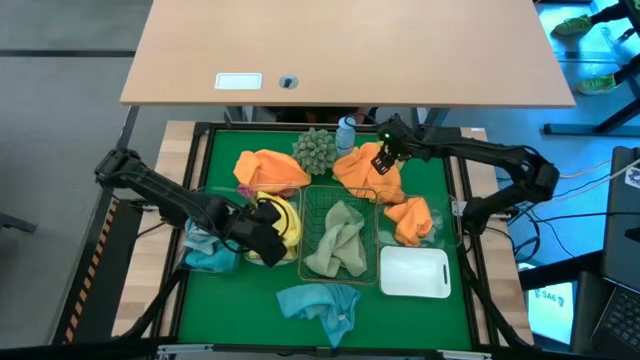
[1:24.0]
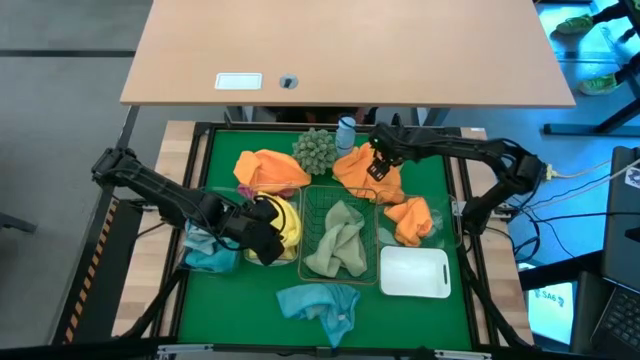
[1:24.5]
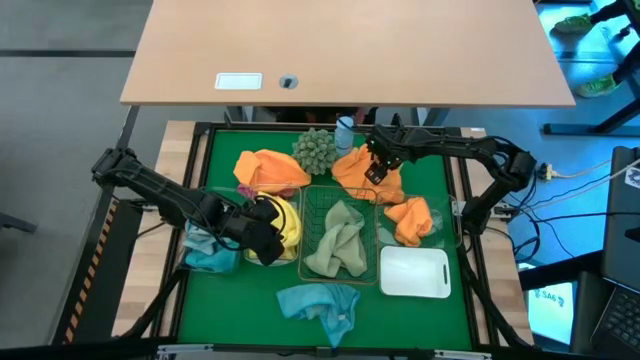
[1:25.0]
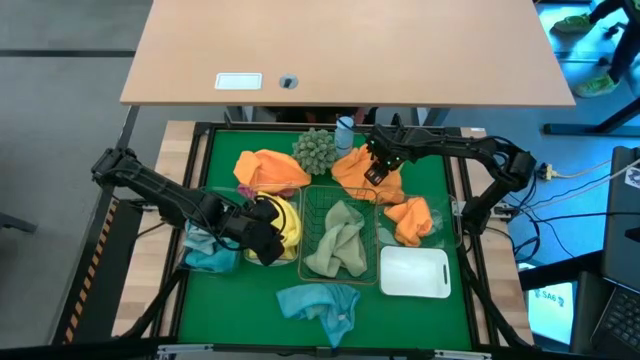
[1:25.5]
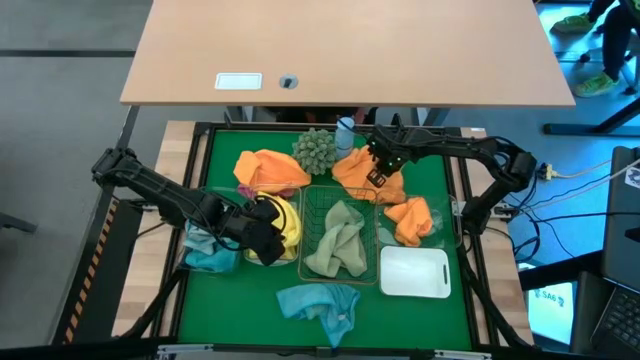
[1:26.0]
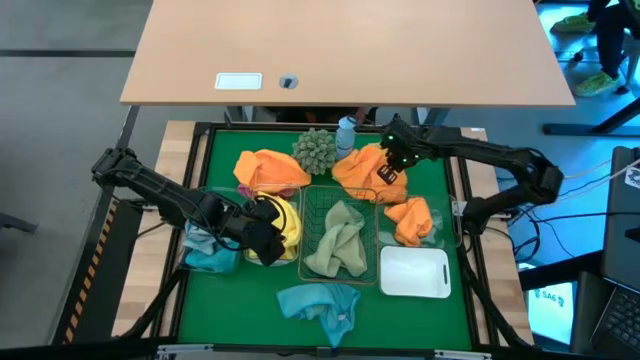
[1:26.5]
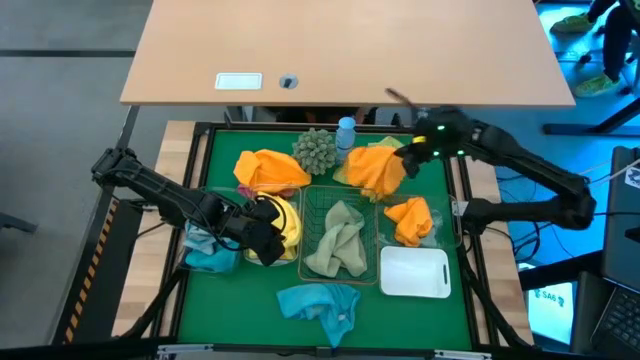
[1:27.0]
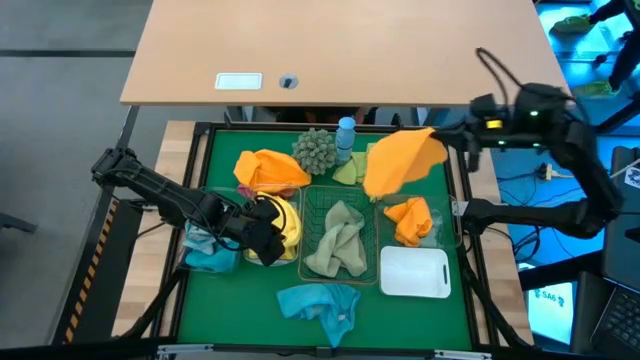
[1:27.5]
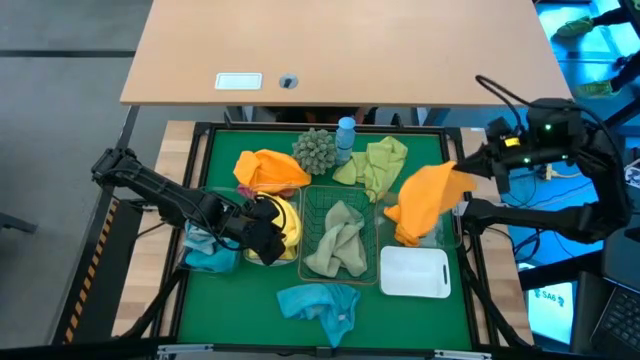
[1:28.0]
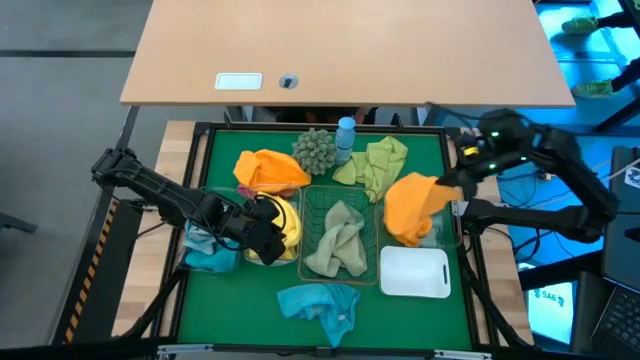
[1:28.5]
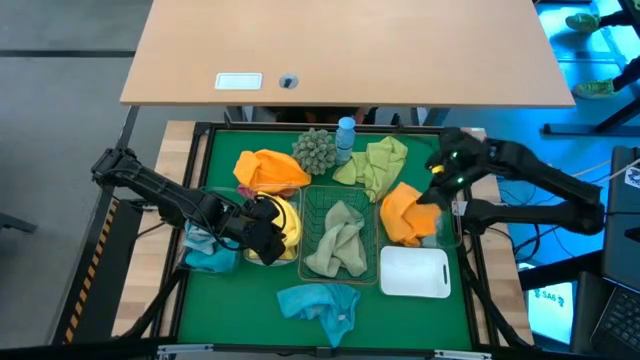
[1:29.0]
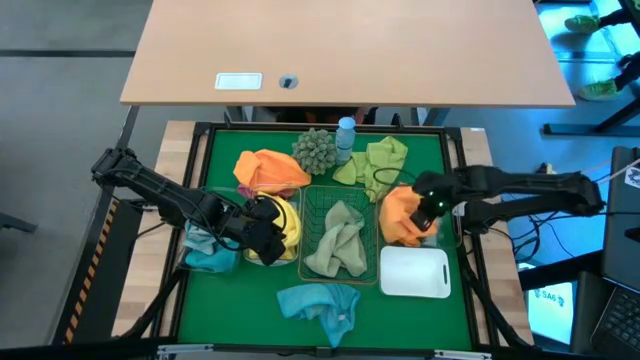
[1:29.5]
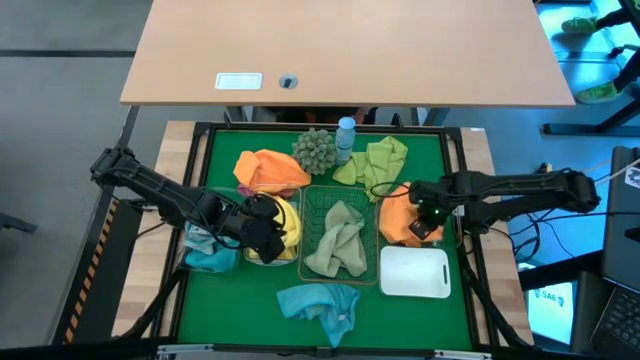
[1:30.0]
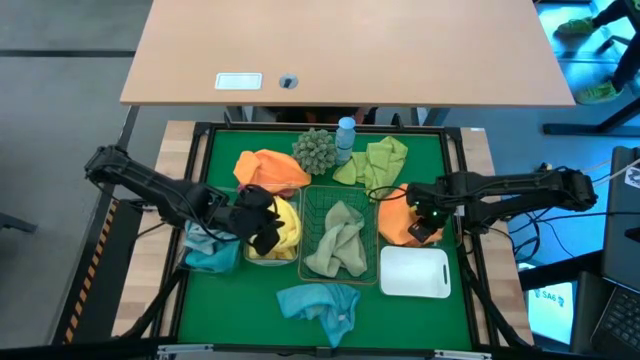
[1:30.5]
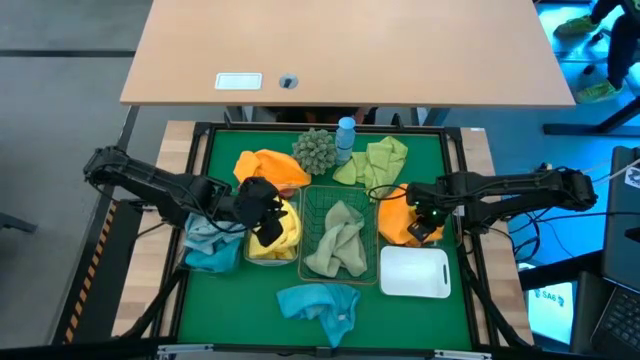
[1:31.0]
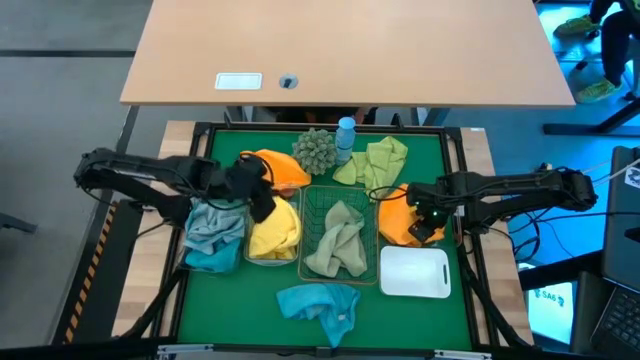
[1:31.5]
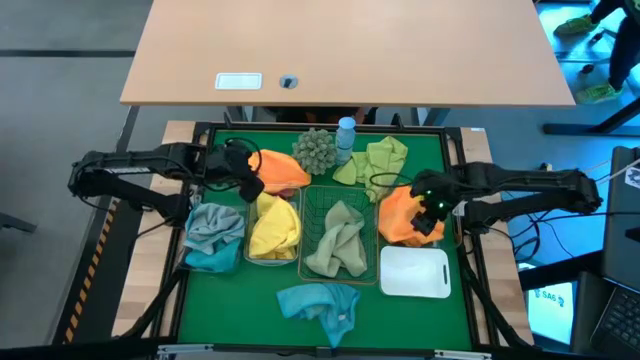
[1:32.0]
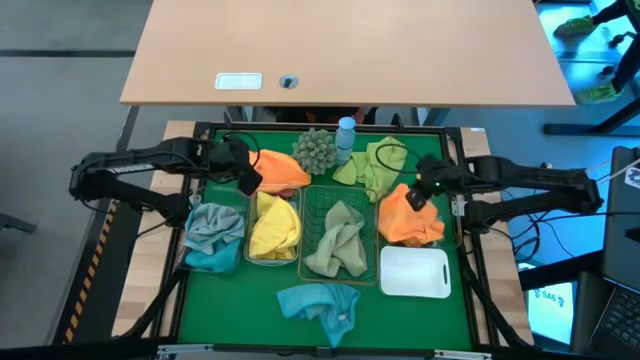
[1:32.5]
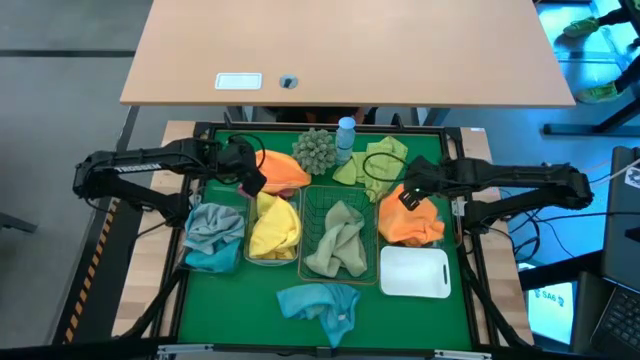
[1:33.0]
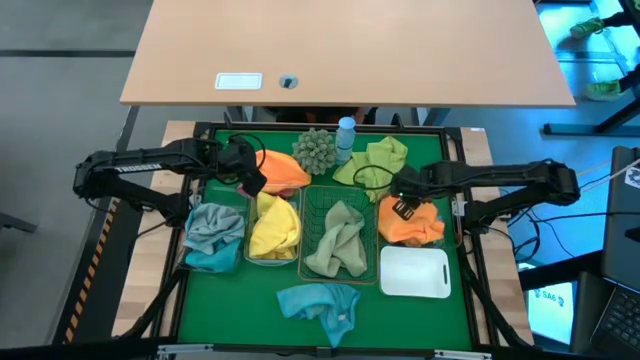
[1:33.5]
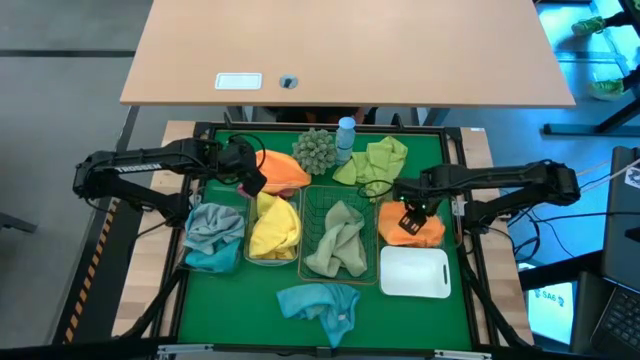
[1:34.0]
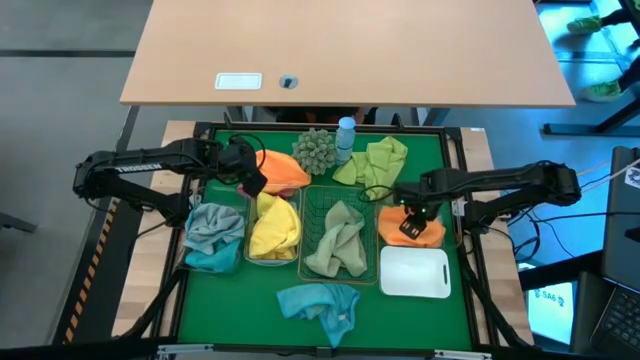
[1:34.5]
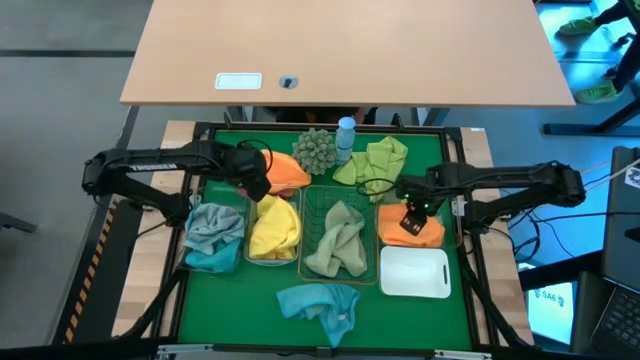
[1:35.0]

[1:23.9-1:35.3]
Task: Sort microfiber towel by color & place in baskets
Put the top right orange microfiber cloth into the right transparent bin

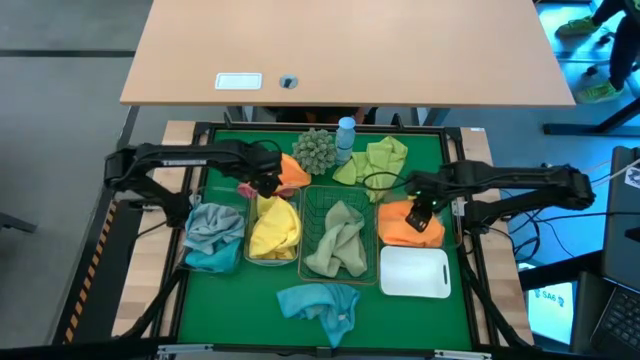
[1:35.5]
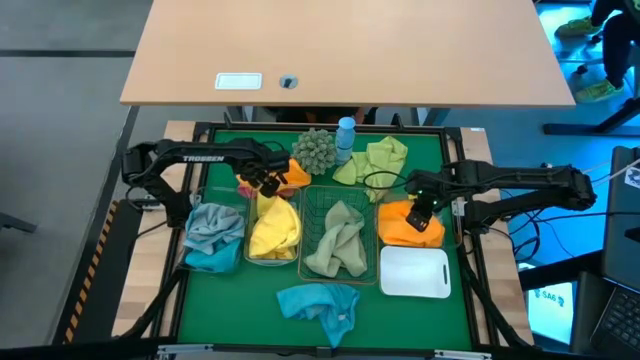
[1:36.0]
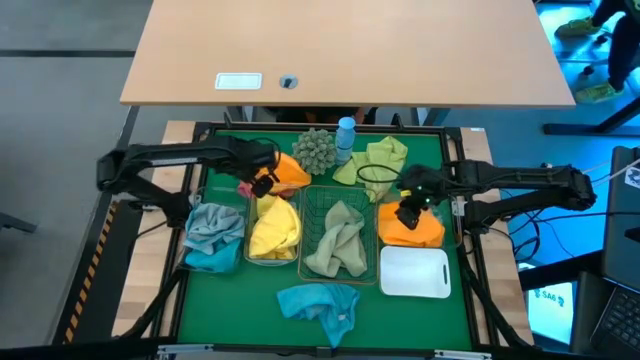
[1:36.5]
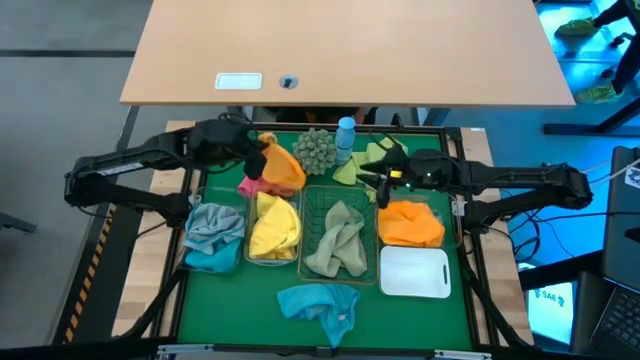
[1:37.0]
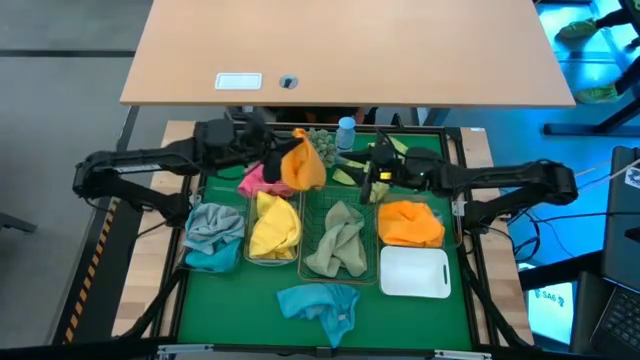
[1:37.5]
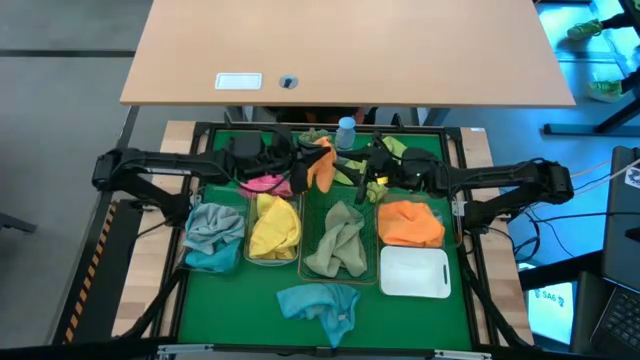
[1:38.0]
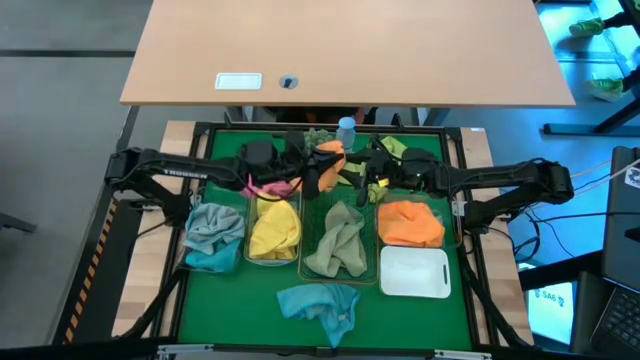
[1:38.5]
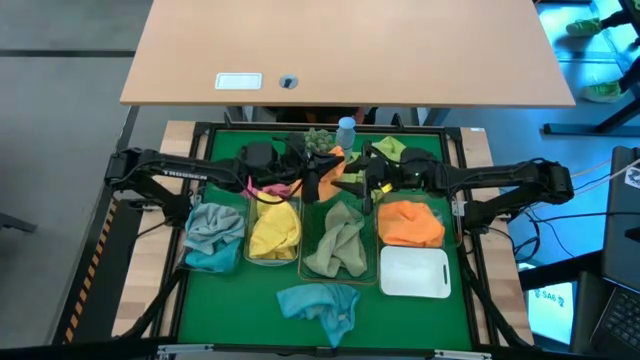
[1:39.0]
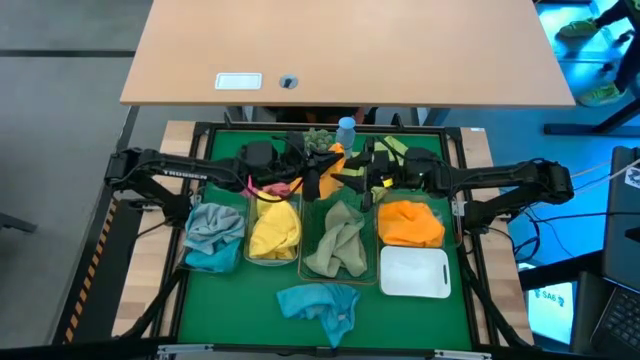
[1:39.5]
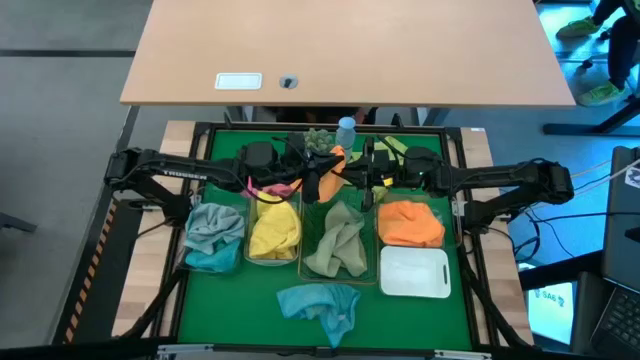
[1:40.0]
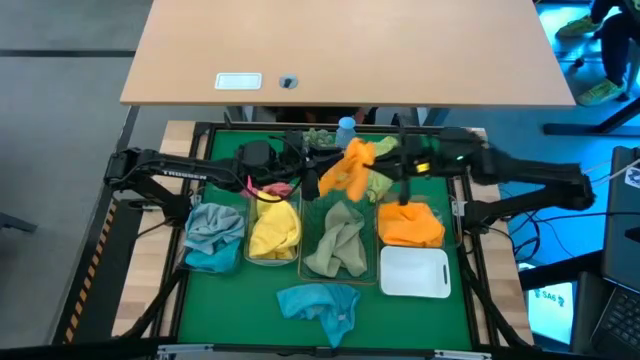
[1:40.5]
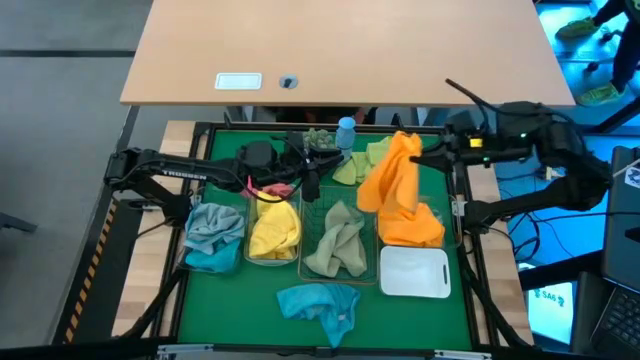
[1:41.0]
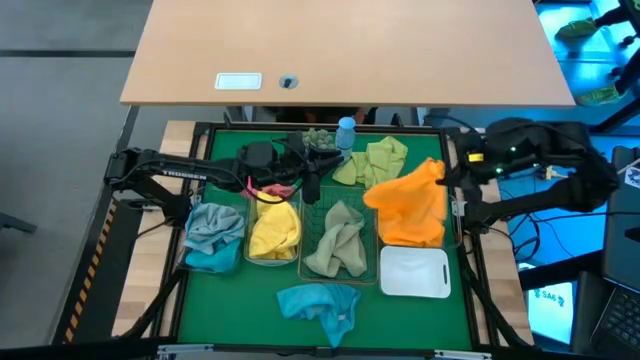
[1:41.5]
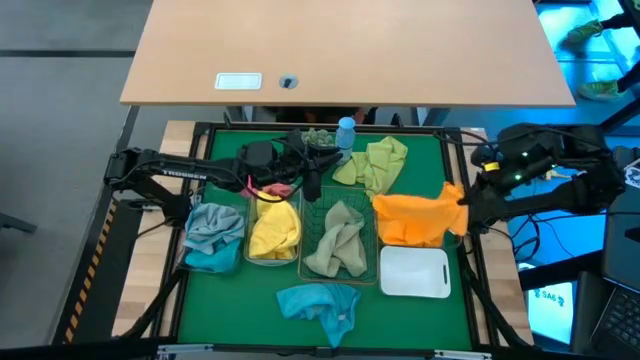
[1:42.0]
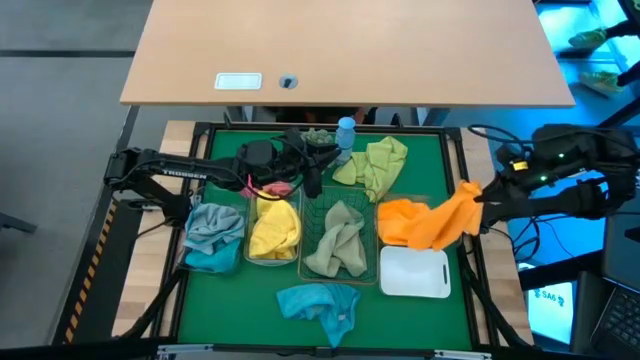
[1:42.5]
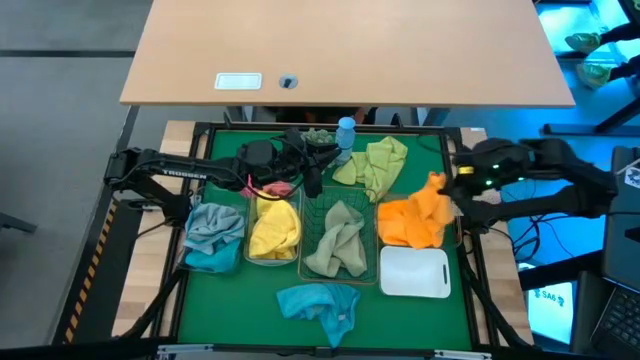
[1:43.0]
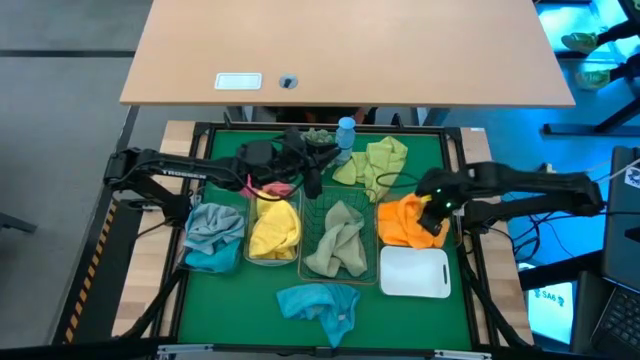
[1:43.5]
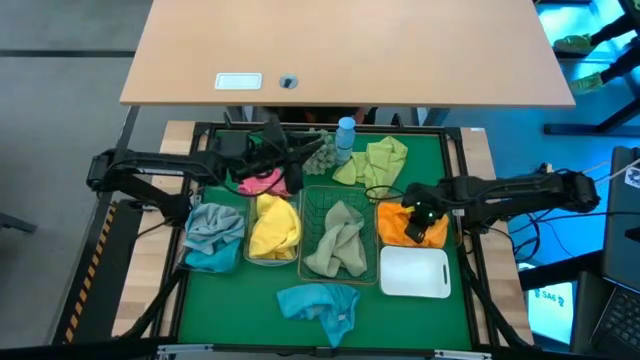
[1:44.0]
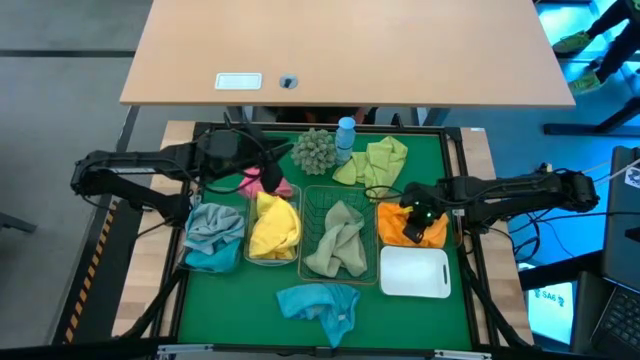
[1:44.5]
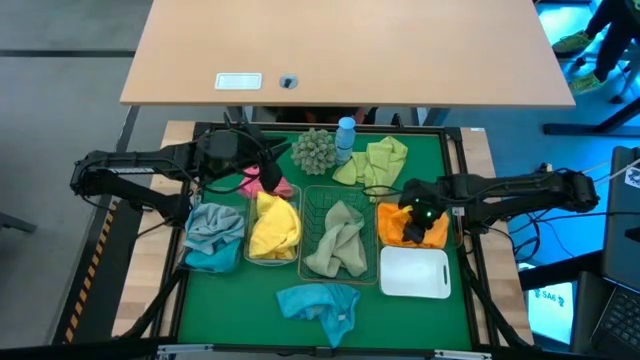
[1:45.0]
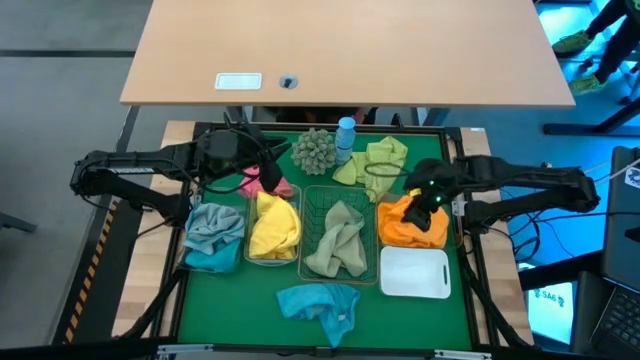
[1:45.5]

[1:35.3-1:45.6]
Put the orange microfiber cloth into the right transparent bin
